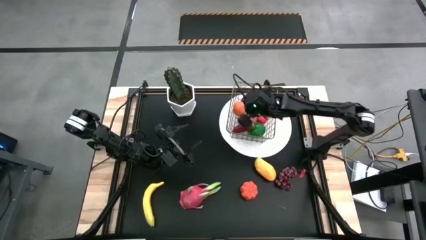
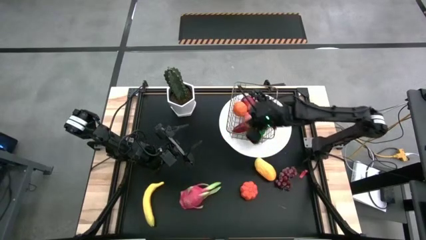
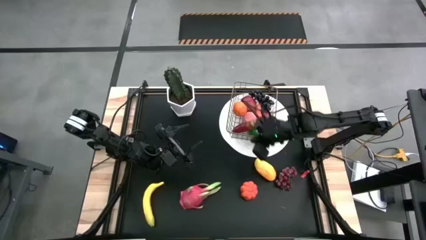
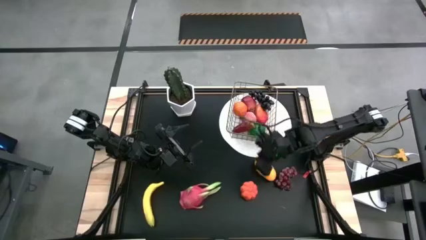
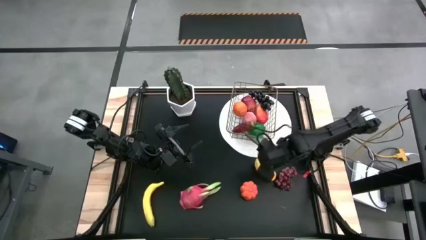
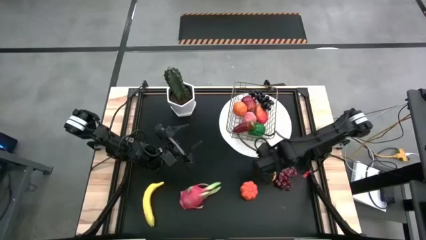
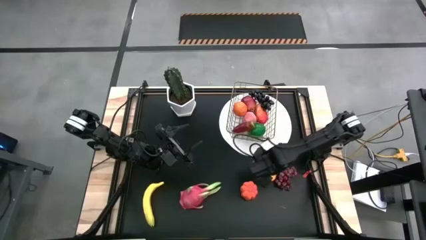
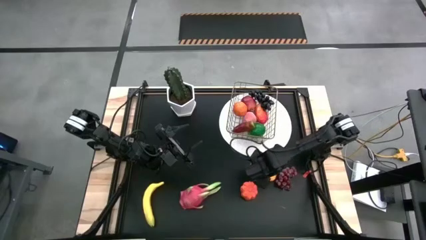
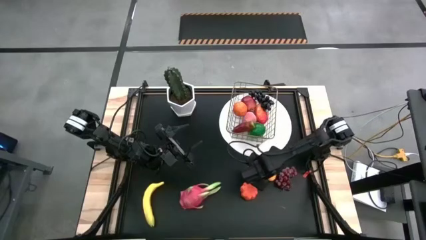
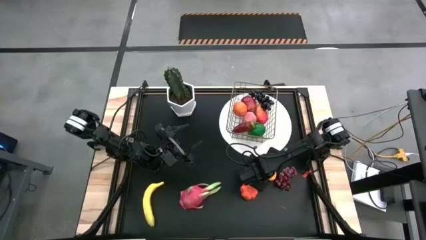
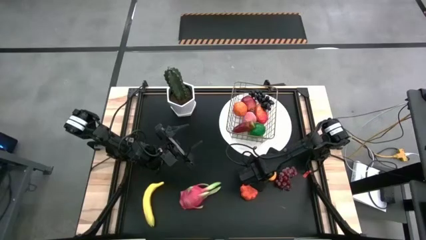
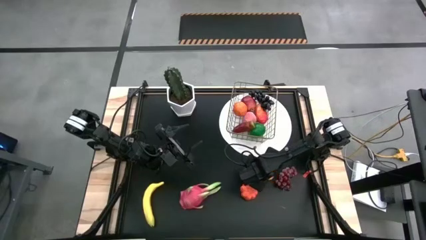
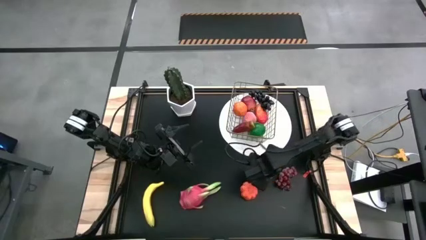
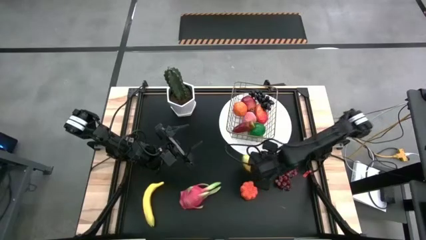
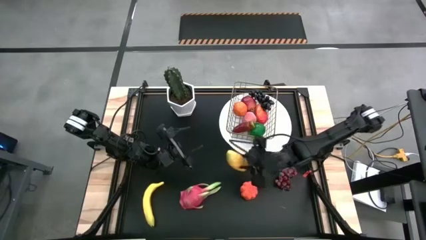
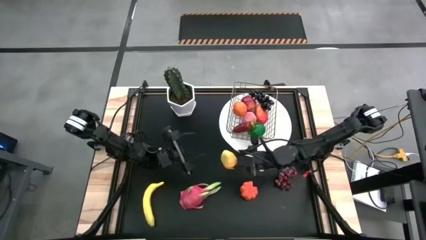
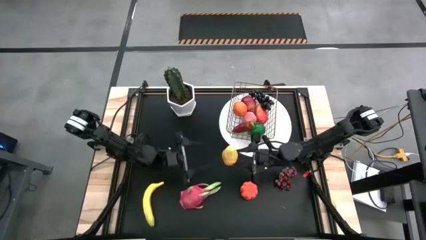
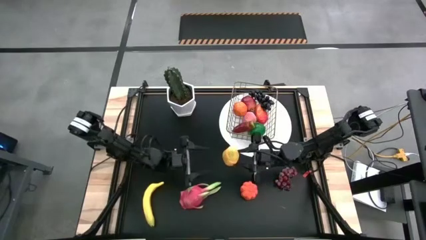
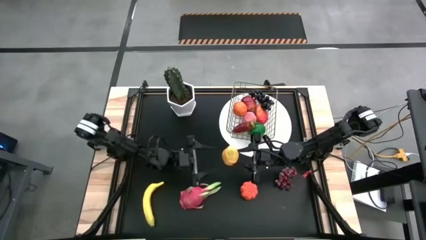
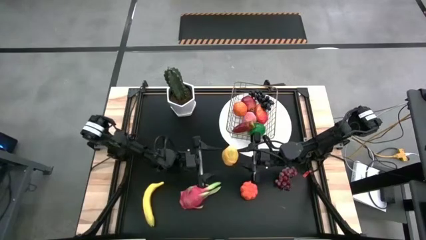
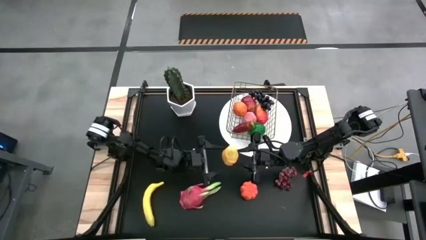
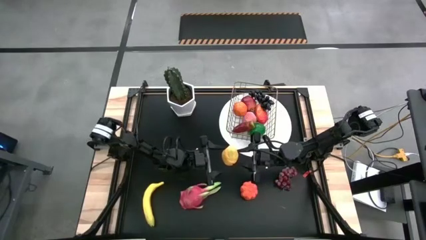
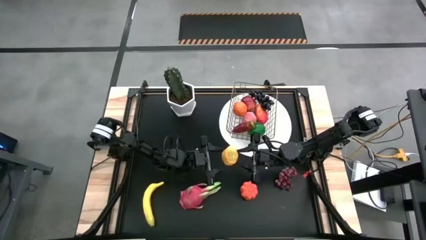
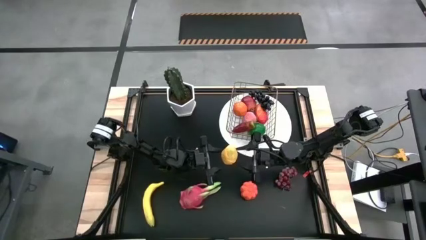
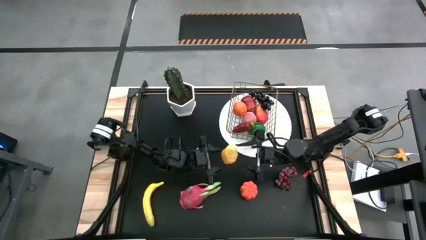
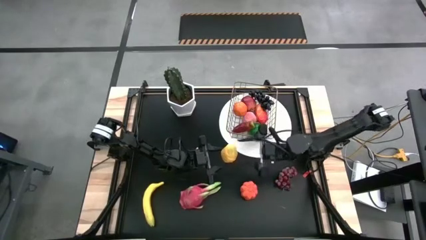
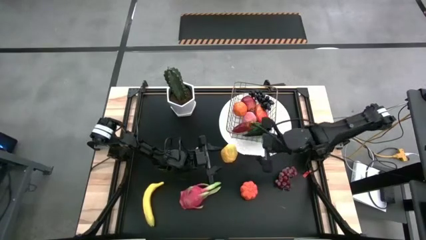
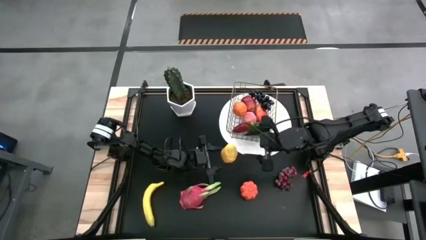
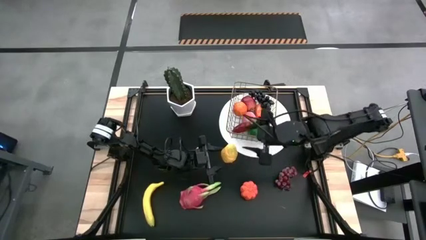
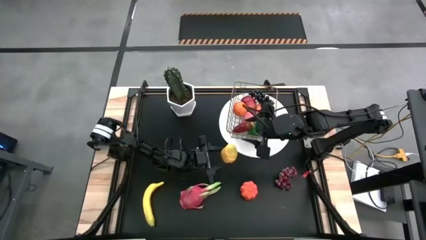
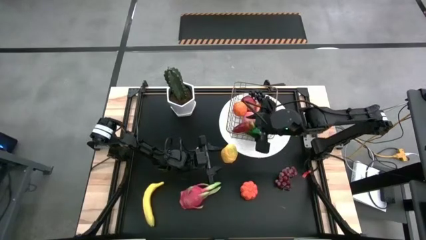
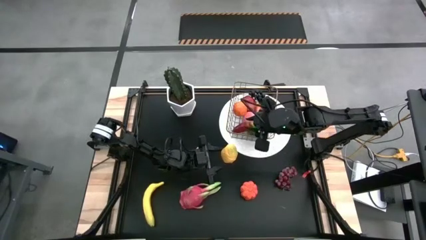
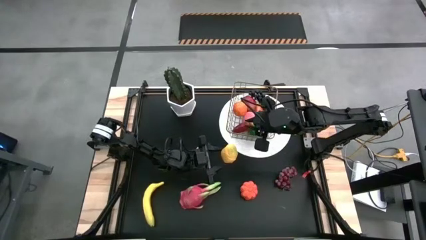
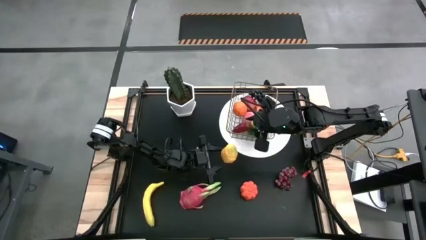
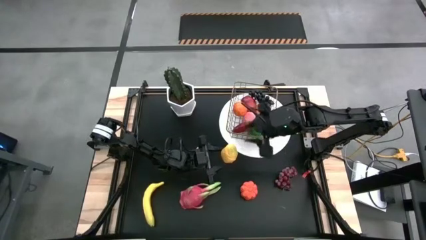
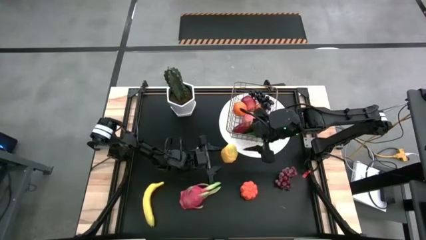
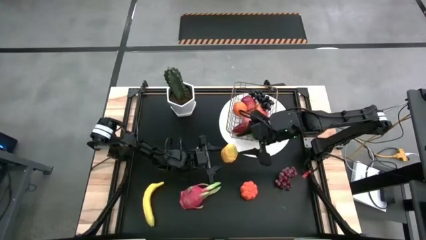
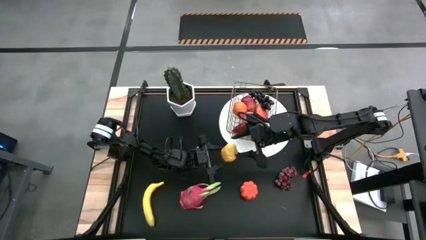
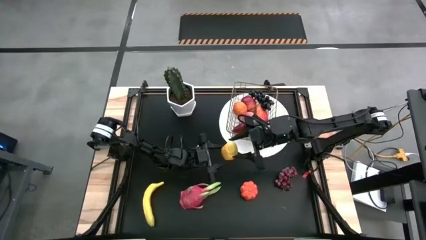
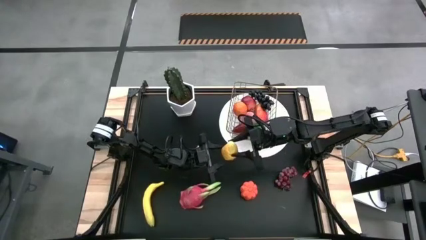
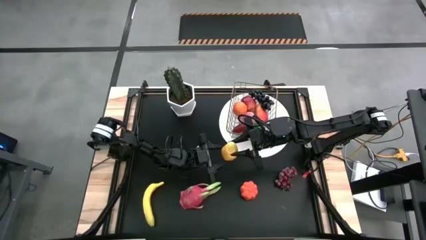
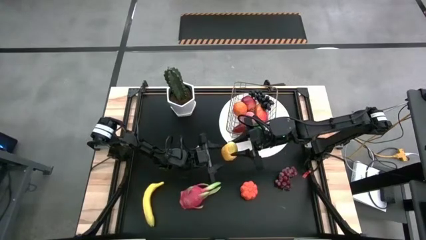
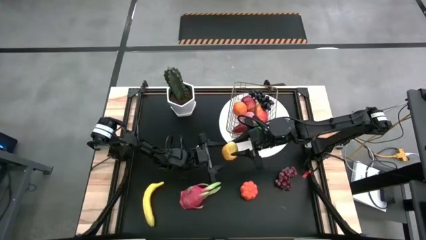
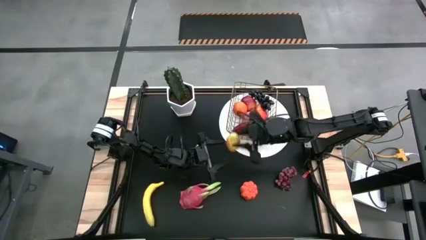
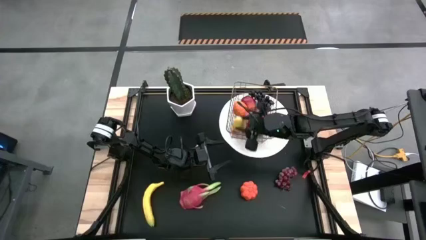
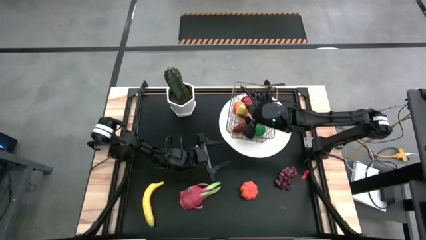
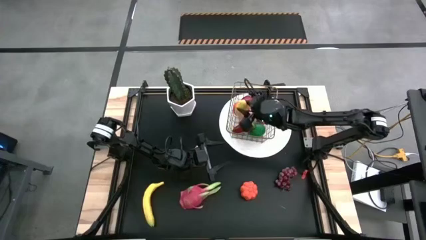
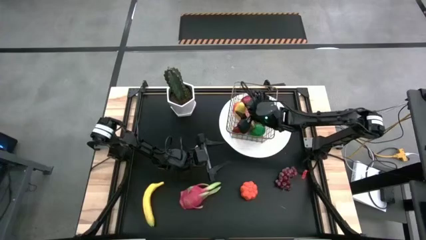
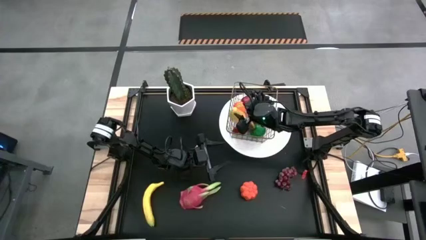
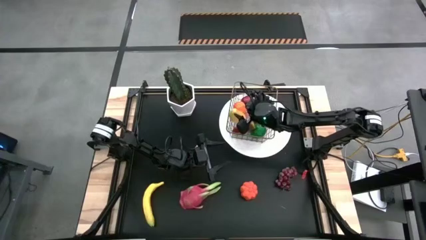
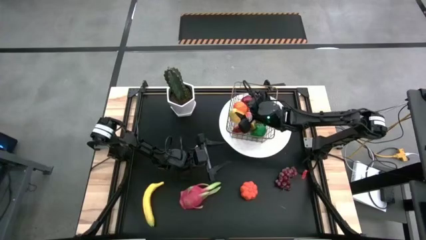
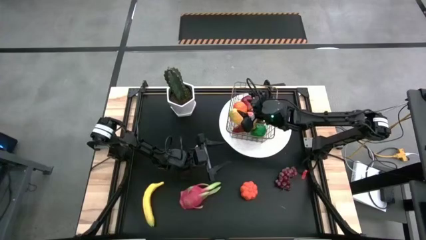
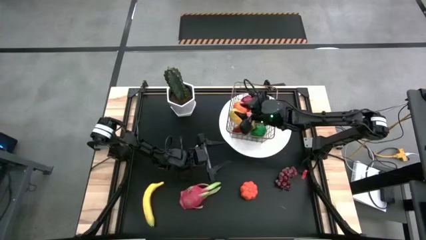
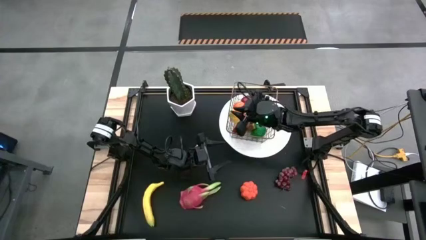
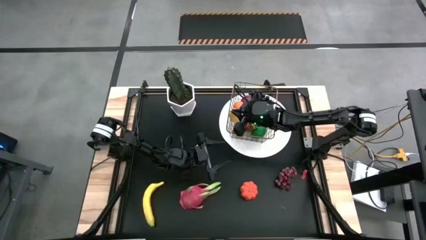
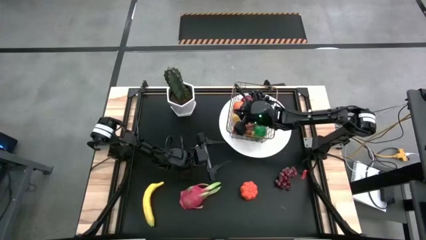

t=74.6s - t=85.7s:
Task: Build produce basket
Put the yellow mango into the wire basket

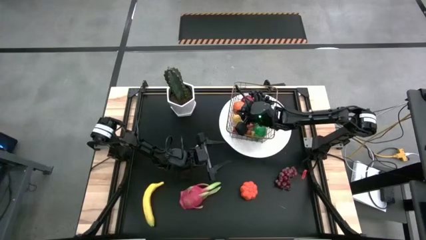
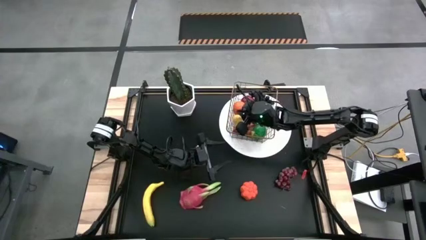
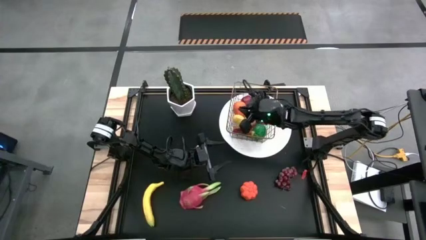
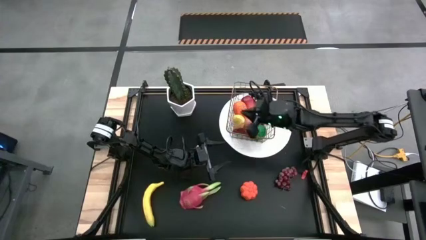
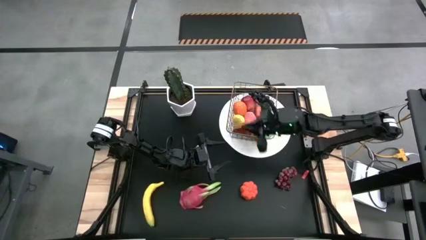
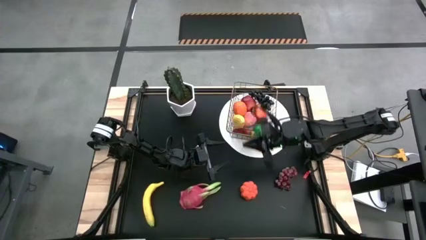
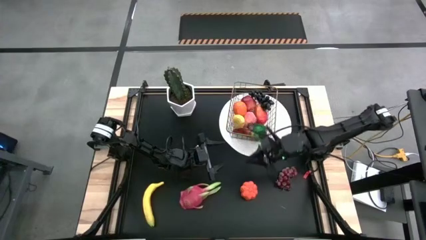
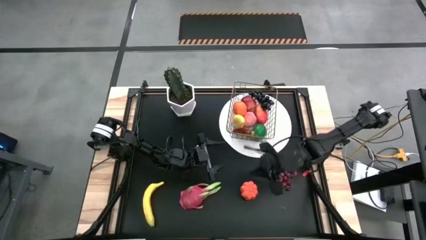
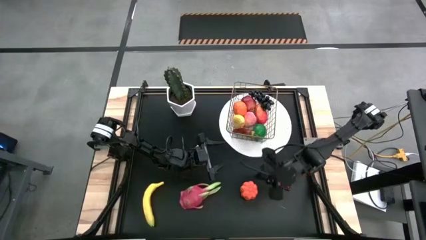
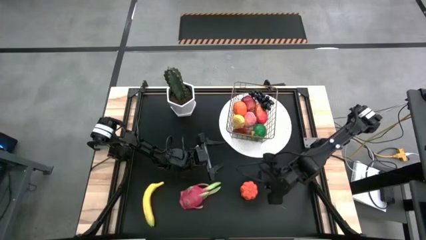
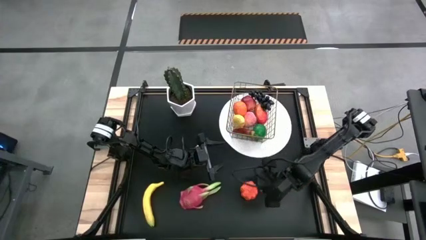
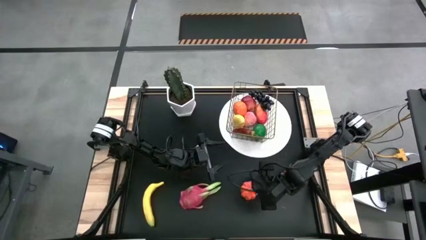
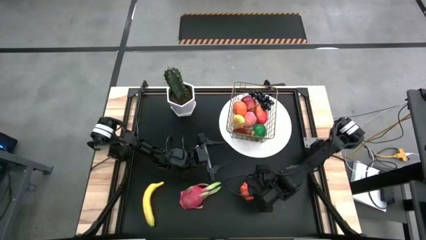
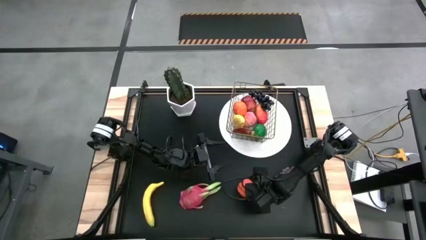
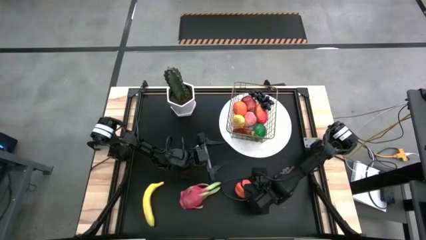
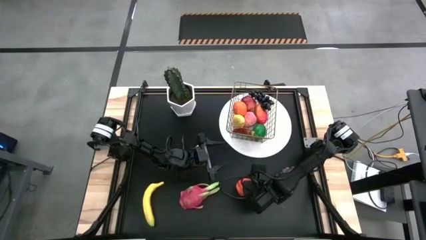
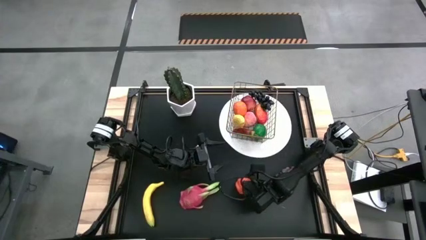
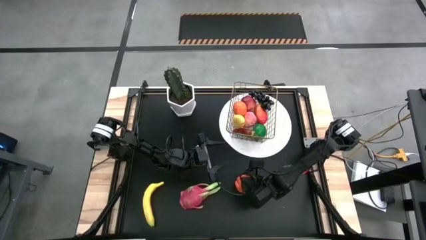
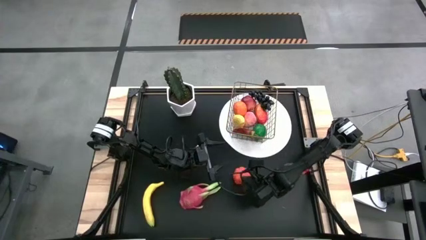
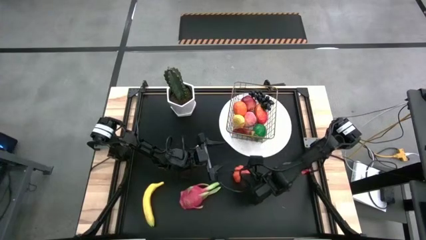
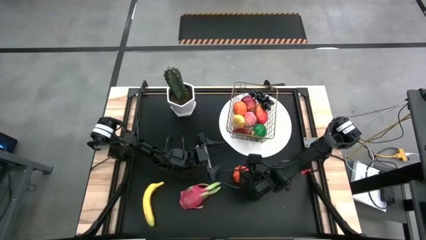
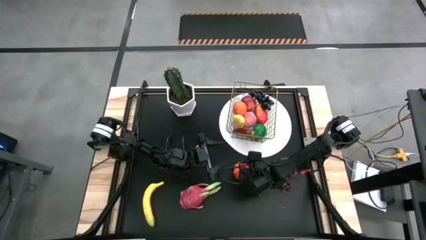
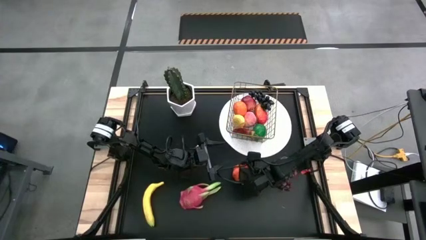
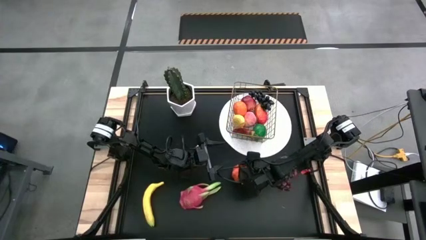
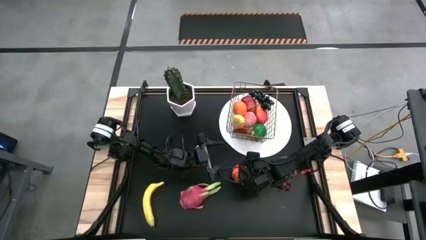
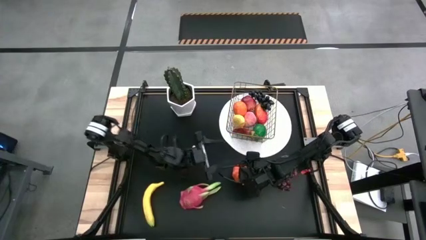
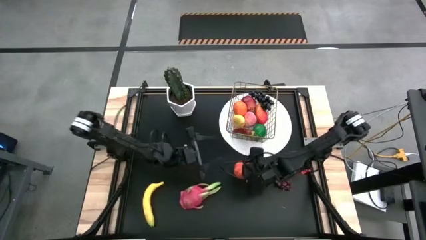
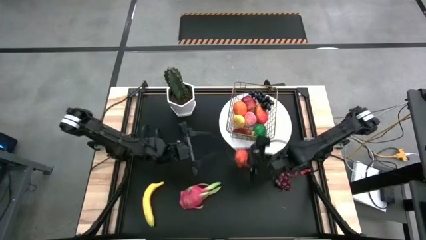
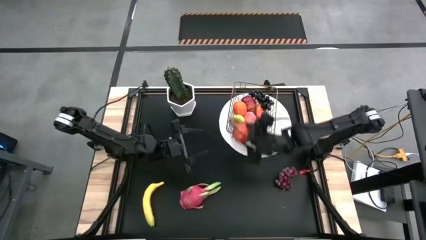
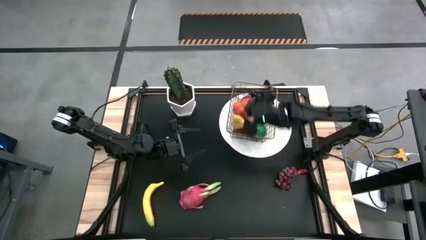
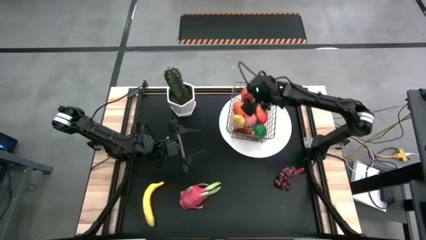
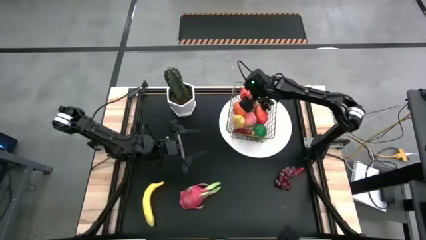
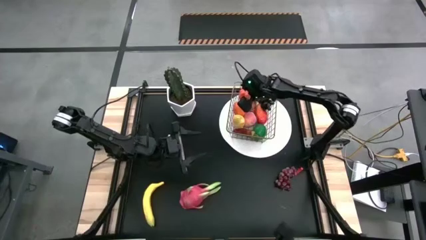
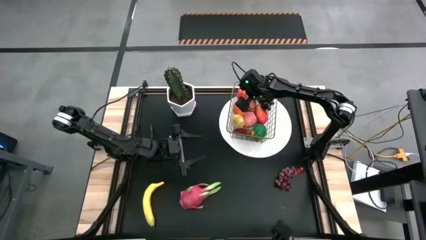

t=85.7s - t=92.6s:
Put the tangerine into the wire basket
